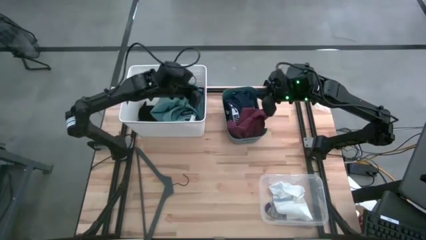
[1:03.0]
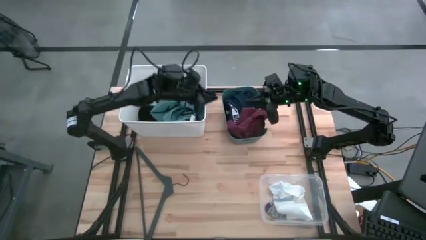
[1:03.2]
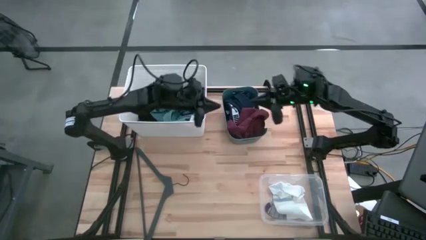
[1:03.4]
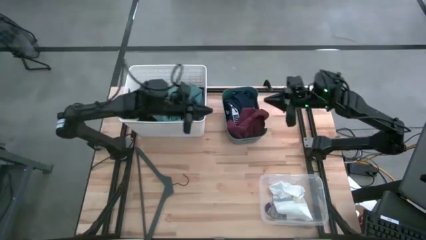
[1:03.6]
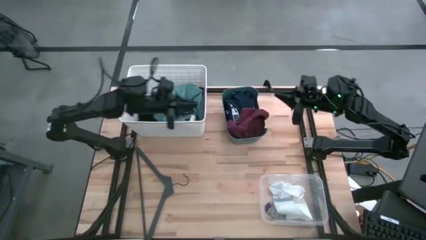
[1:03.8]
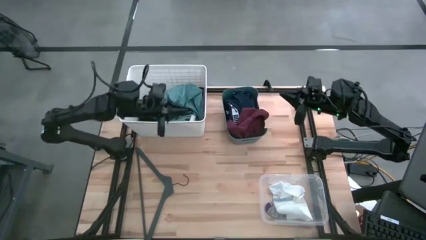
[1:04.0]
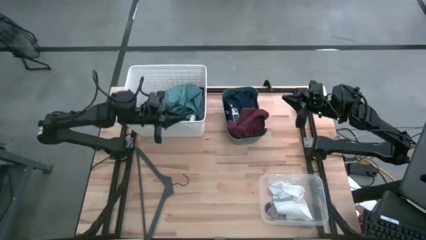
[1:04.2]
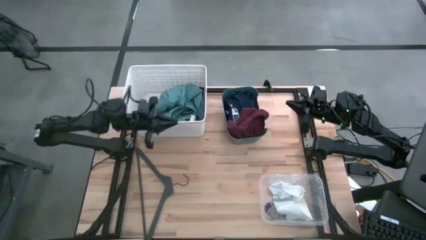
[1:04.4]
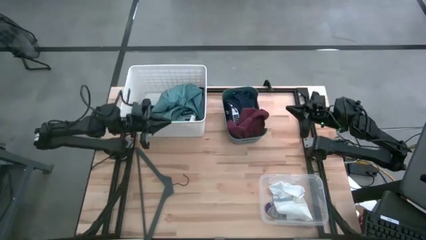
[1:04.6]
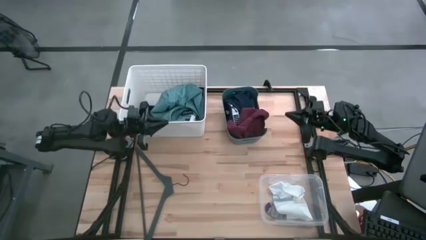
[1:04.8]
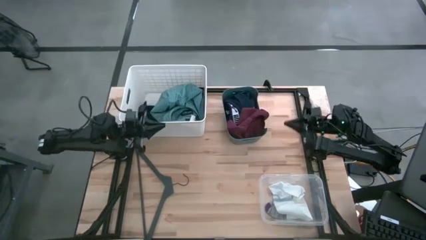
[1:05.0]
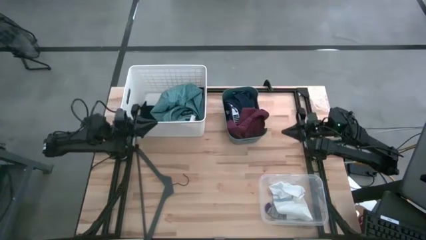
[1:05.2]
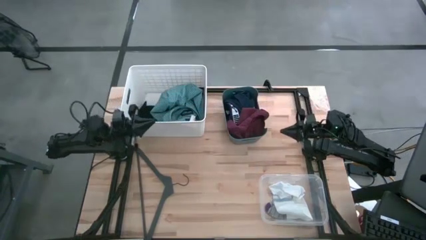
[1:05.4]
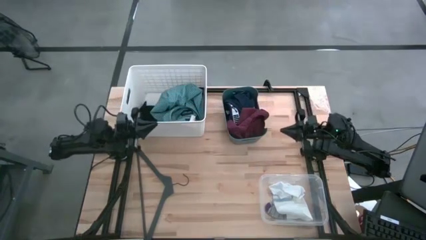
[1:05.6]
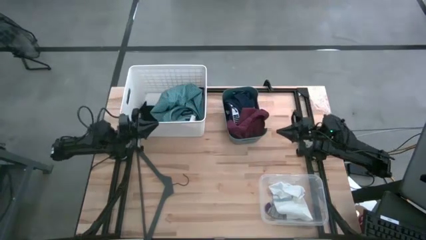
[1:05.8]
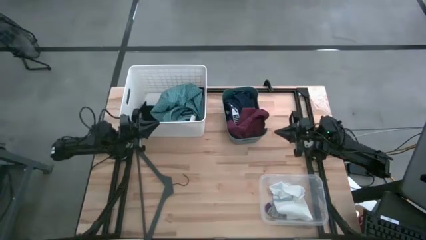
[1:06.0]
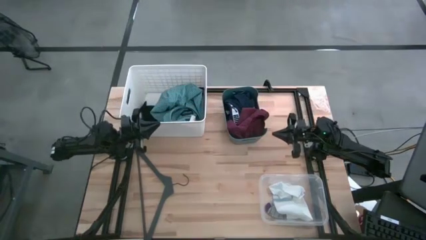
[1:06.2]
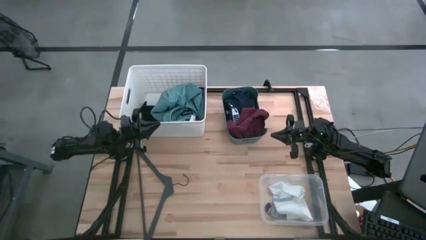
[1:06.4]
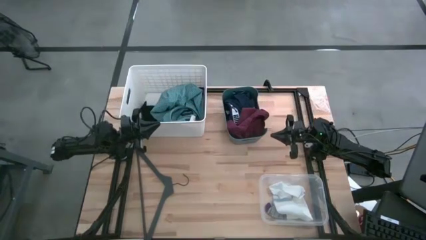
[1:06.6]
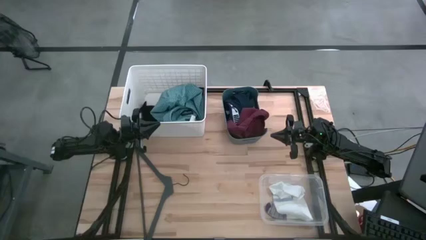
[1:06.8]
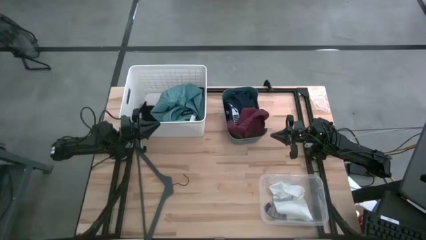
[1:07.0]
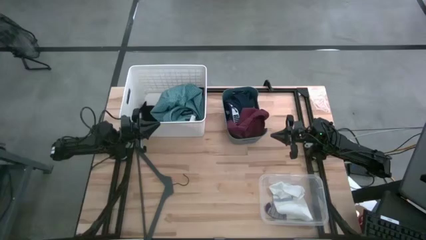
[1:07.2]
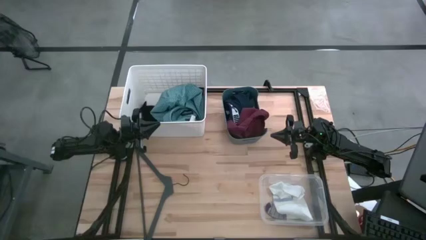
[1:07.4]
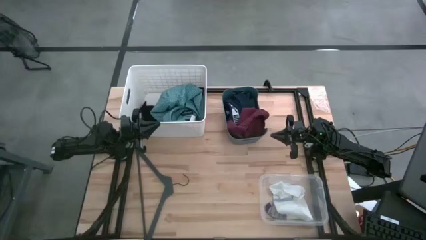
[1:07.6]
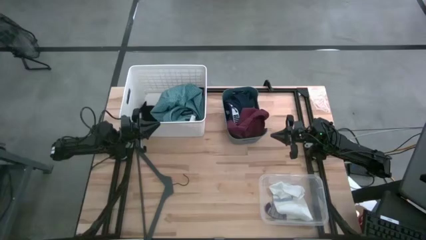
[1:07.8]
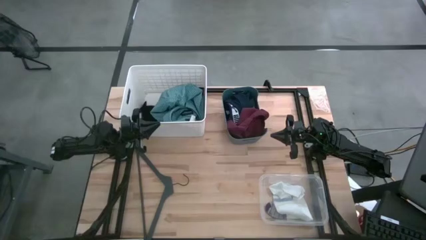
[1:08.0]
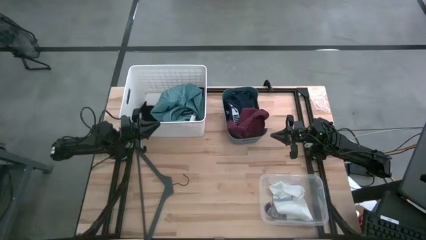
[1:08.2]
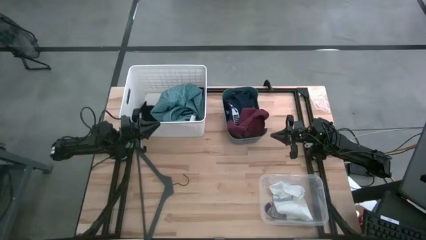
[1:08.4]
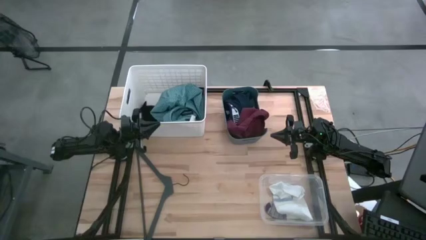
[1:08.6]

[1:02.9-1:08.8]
Task: Pick & Place Cloths
Return to Home Position

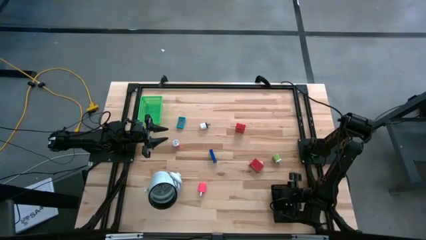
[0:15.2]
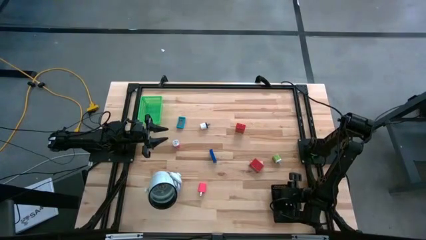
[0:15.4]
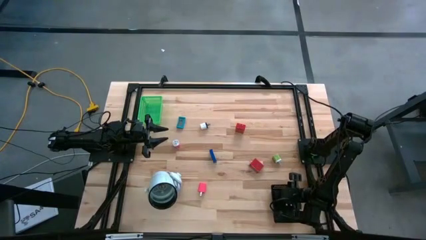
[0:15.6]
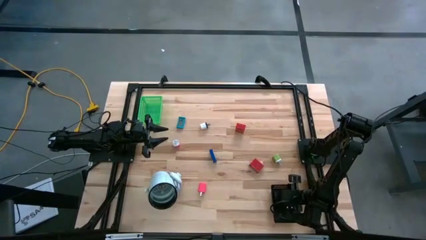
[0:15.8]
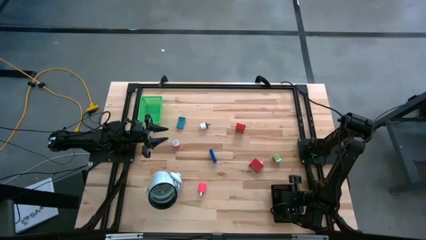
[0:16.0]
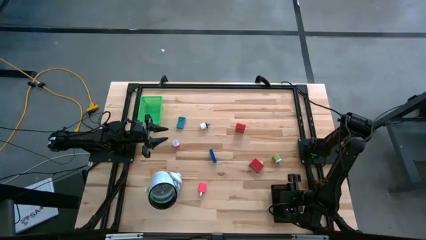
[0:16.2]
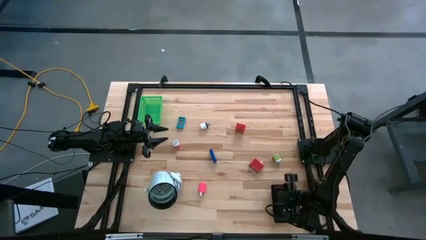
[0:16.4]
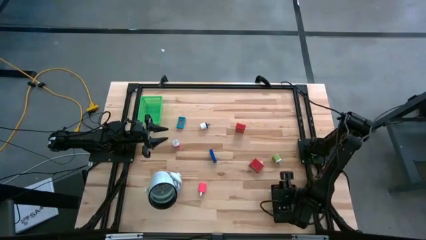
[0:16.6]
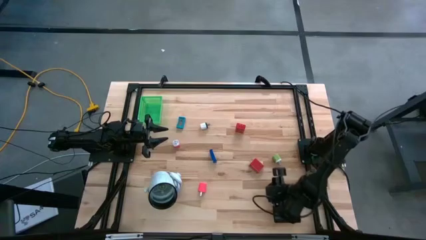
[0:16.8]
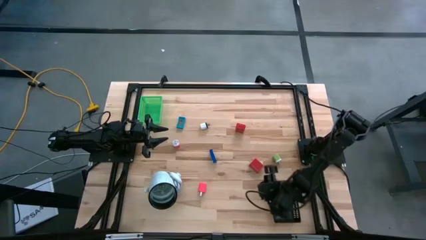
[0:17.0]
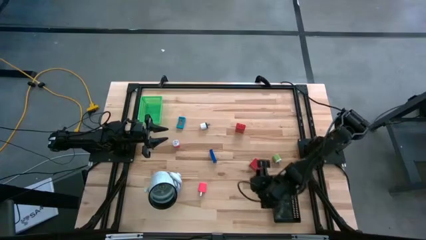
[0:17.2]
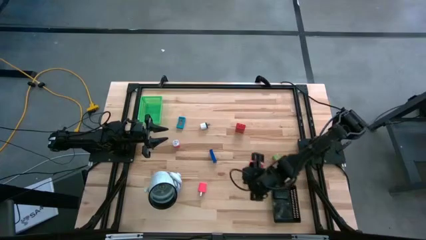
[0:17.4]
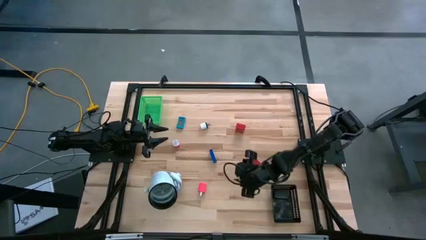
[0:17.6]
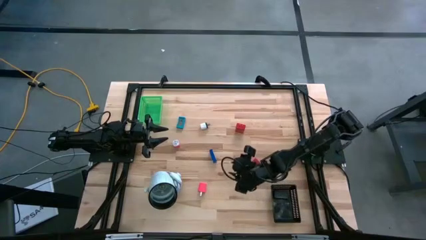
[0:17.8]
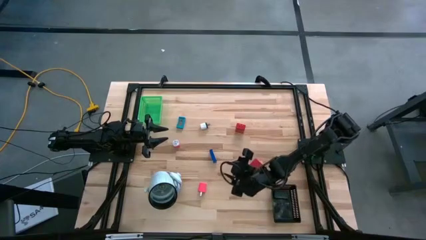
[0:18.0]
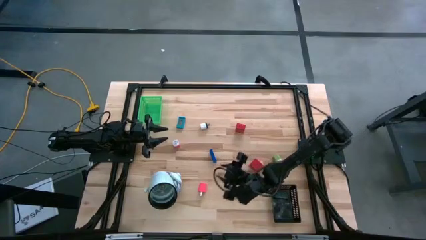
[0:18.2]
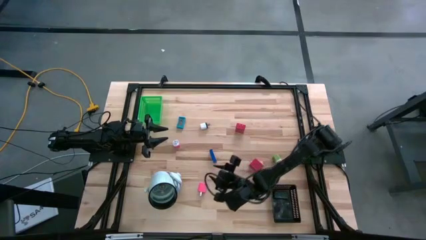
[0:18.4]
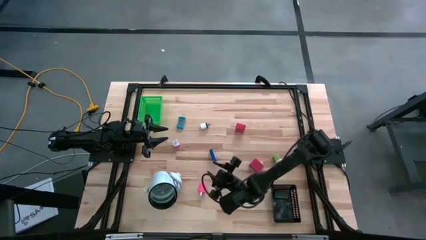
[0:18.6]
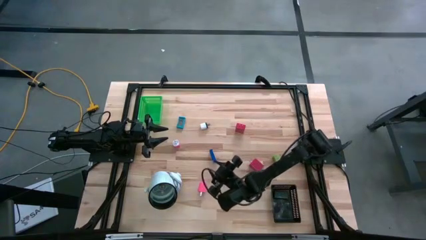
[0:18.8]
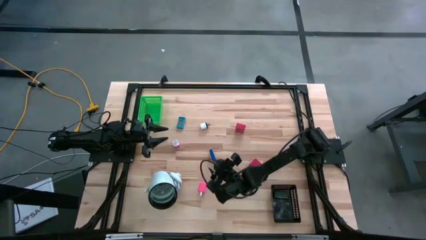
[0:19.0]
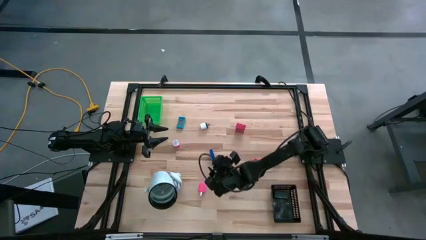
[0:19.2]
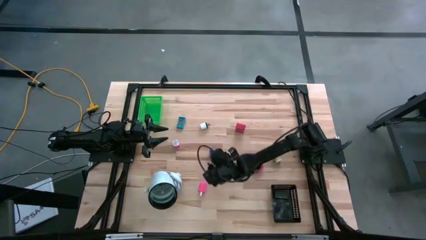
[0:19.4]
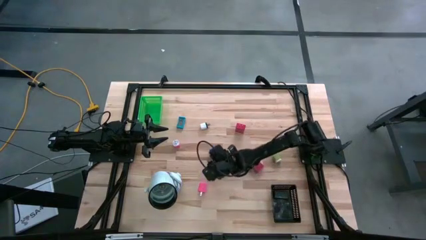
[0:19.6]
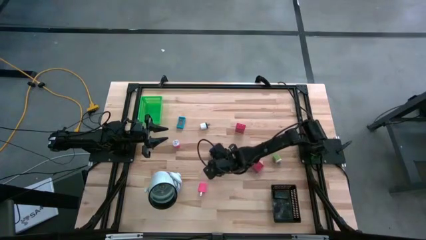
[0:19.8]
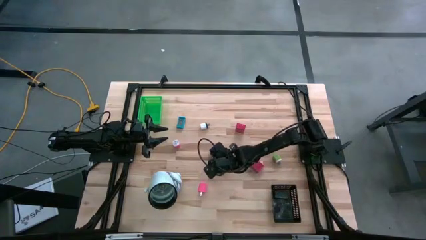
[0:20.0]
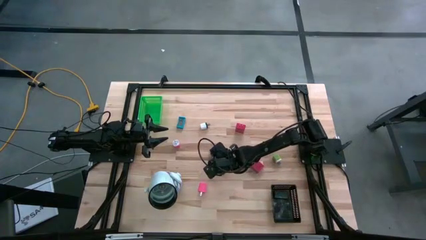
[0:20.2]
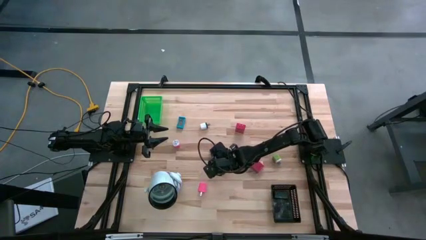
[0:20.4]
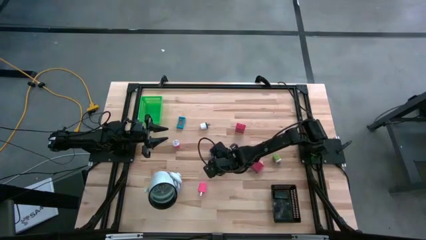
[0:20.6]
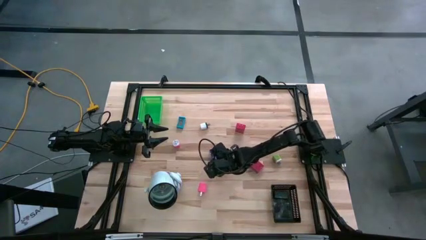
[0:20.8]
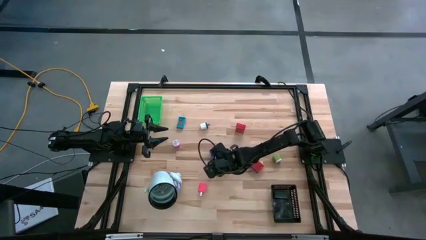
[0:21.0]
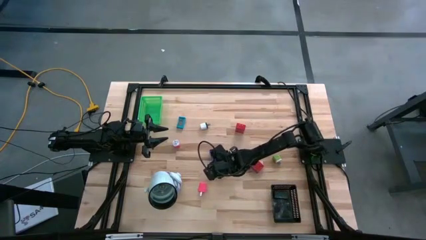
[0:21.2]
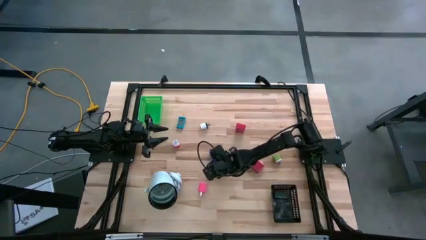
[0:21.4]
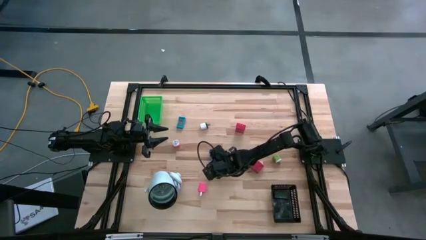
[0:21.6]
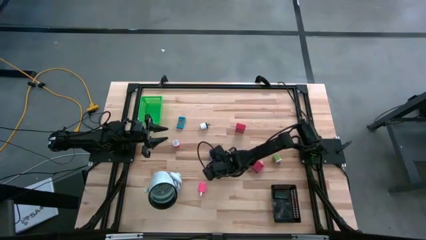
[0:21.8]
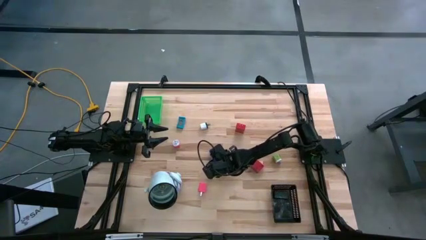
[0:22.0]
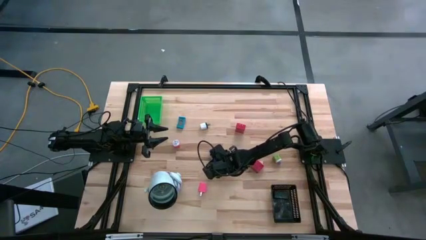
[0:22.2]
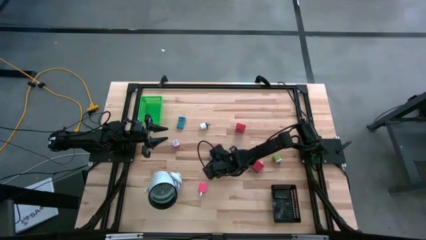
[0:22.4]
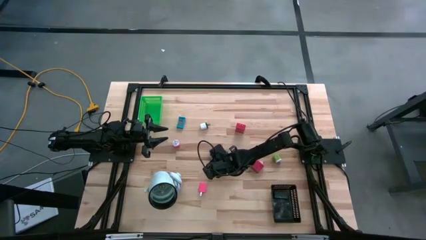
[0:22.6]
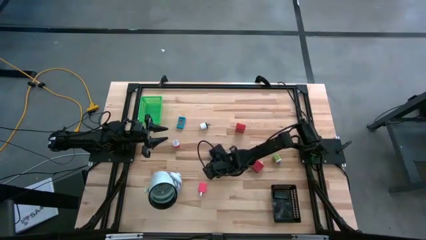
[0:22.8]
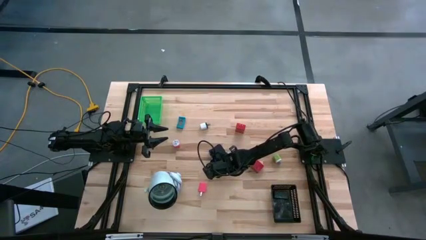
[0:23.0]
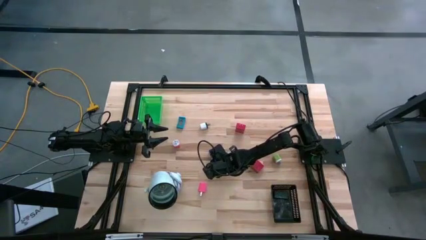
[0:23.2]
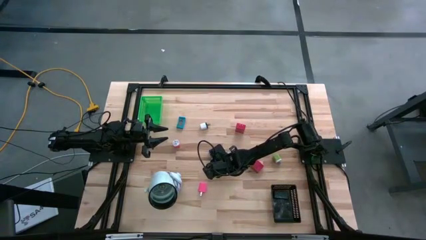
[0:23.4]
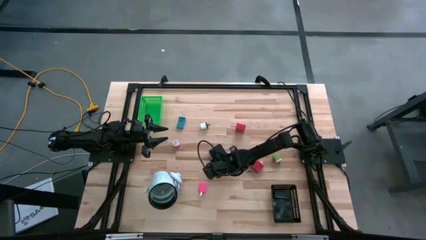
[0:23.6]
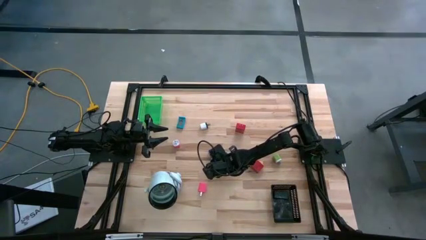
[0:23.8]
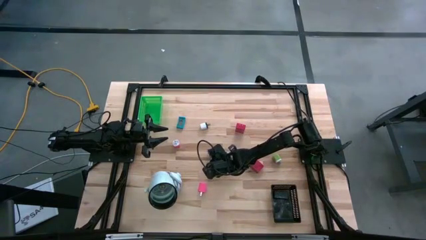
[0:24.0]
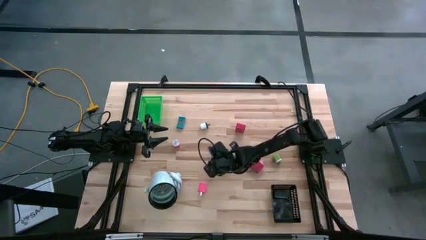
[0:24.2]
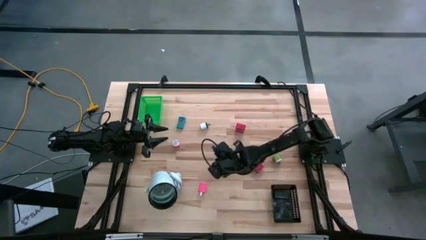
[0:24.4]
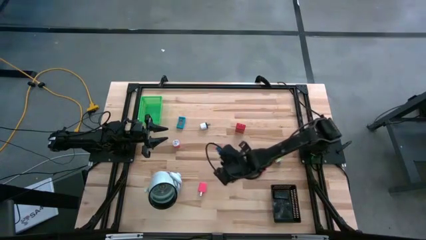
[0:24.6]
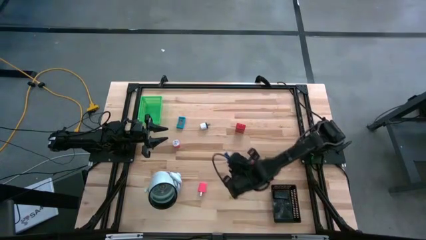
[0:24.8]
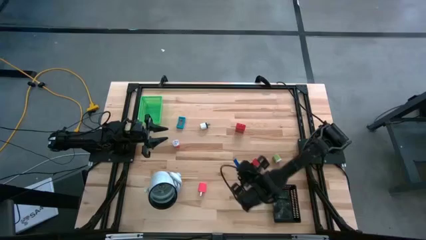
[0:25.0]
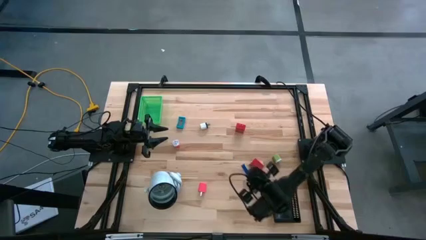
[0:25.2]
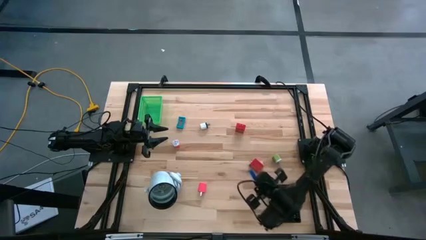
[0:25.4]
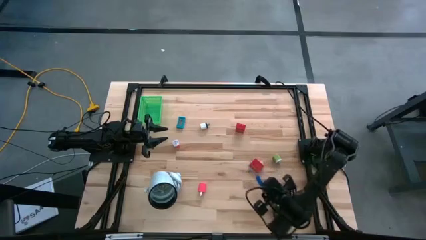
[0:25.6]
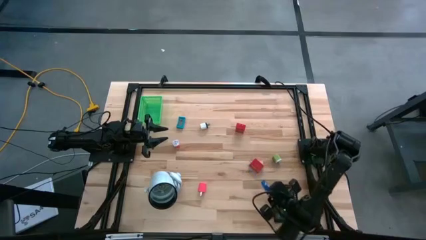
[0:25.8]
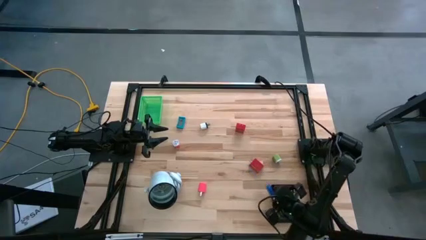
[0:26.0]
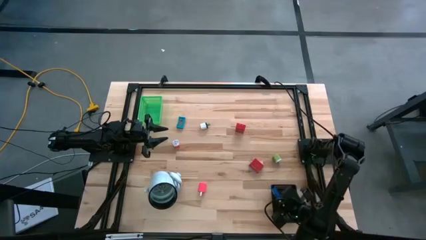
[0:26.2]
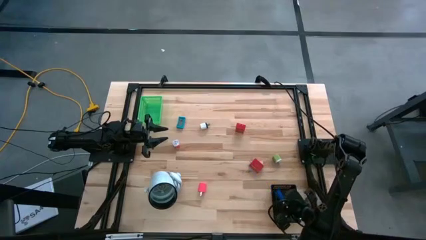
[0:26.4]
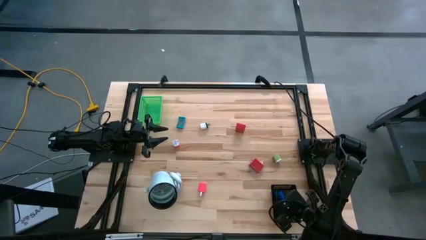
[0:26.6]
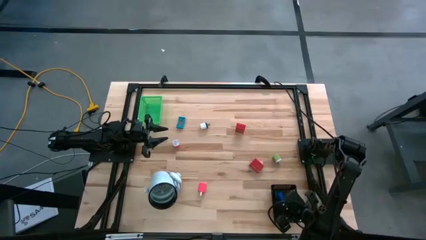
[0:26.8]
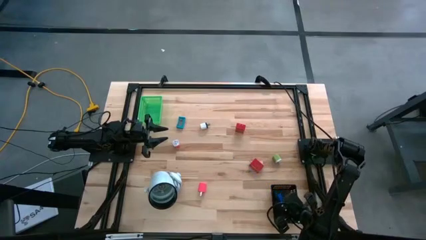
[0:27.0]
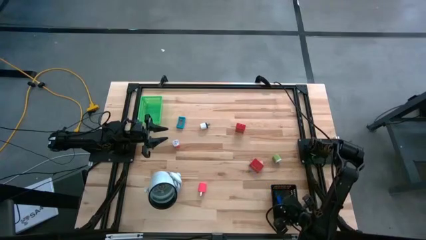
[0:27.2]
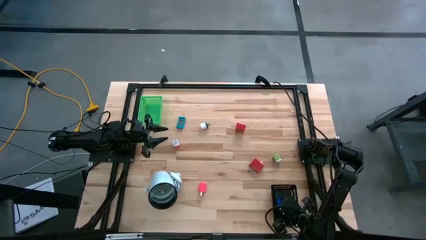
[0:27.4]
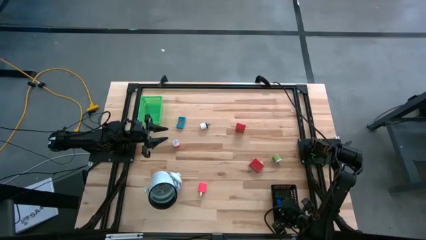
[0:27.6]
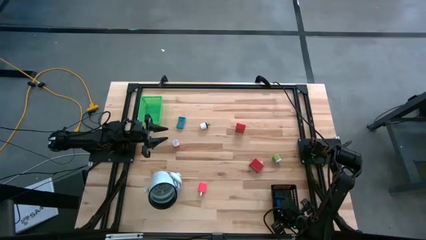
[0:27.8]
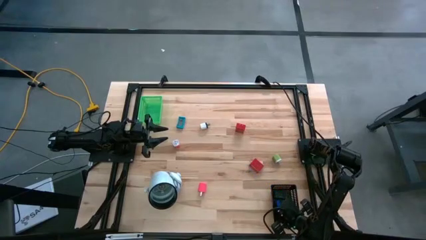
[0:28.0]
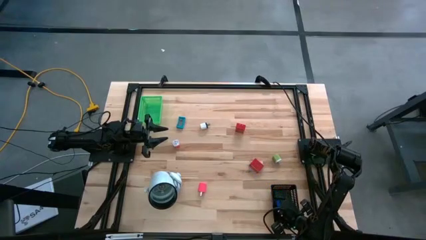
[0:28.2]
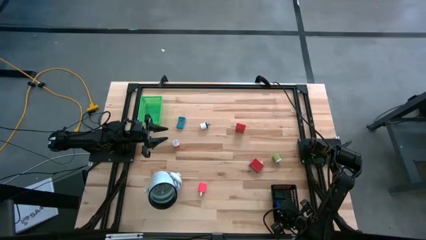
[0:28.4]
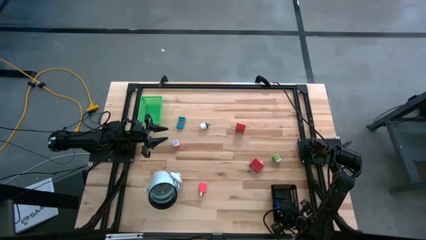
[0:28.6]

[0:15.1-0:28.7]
Task: Pick & Place Office items
Put the blue digital clock into the black bin
